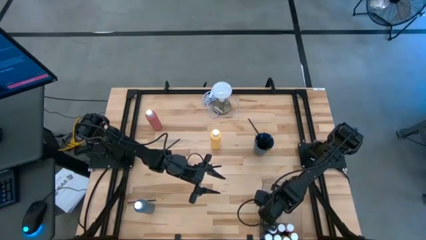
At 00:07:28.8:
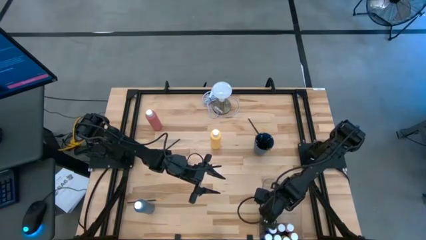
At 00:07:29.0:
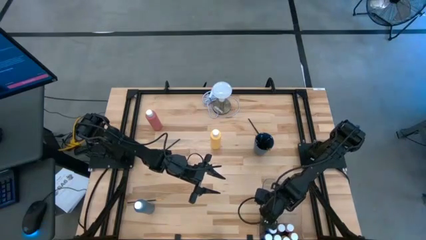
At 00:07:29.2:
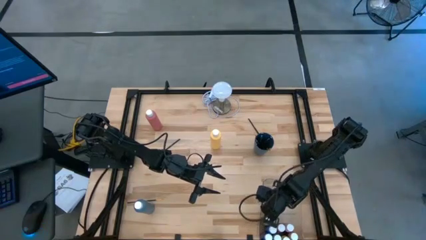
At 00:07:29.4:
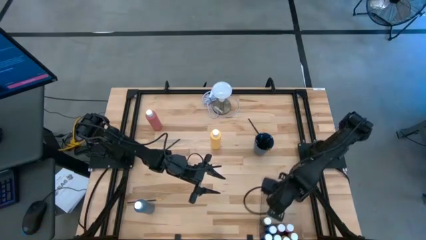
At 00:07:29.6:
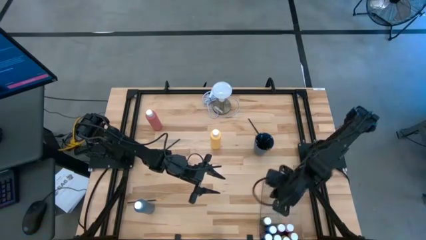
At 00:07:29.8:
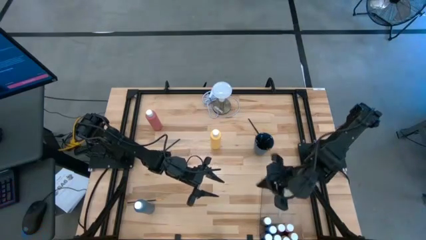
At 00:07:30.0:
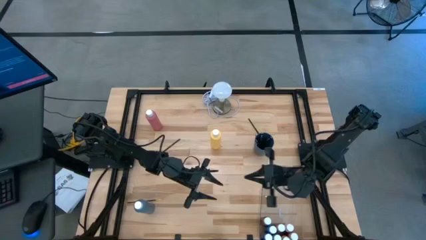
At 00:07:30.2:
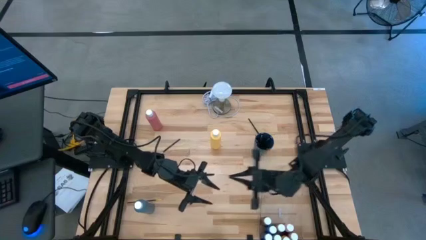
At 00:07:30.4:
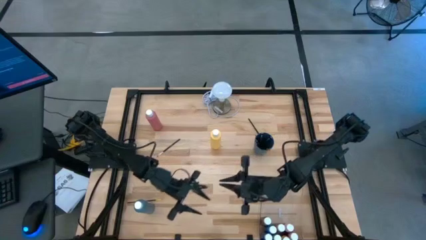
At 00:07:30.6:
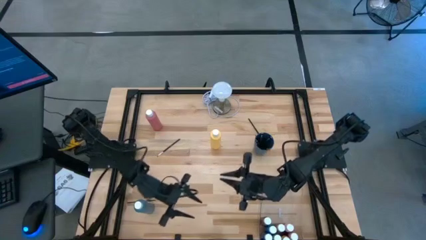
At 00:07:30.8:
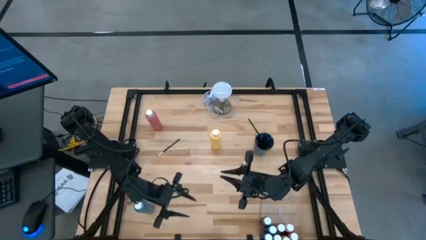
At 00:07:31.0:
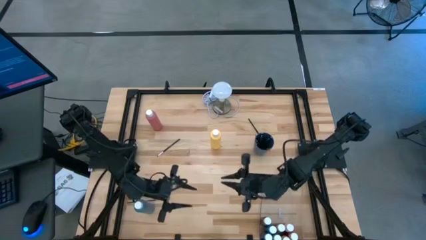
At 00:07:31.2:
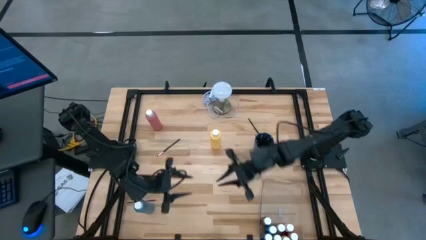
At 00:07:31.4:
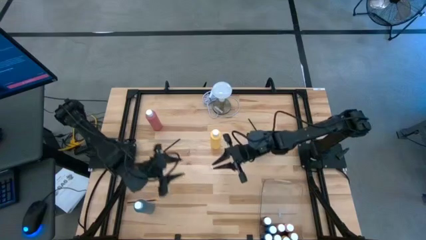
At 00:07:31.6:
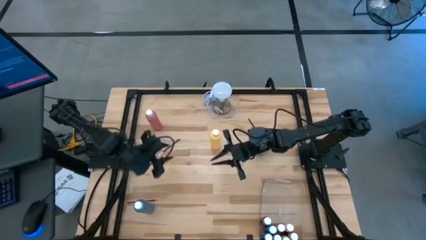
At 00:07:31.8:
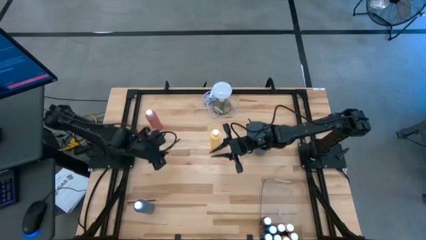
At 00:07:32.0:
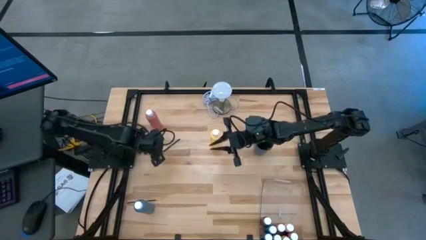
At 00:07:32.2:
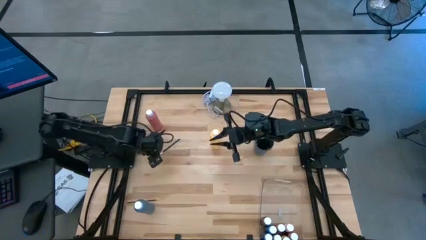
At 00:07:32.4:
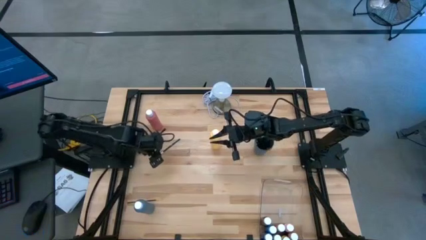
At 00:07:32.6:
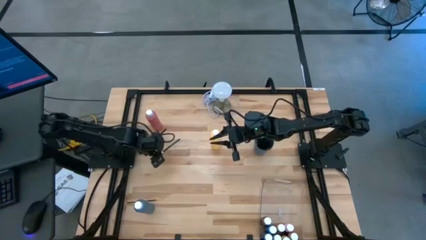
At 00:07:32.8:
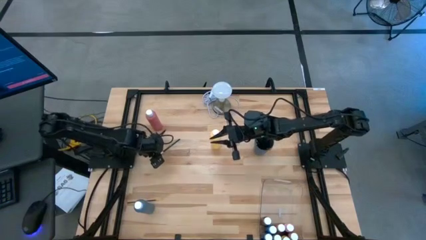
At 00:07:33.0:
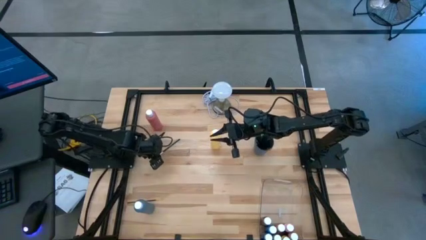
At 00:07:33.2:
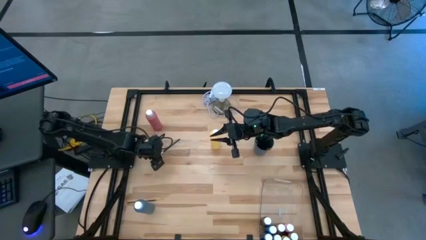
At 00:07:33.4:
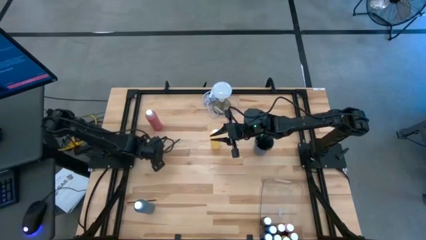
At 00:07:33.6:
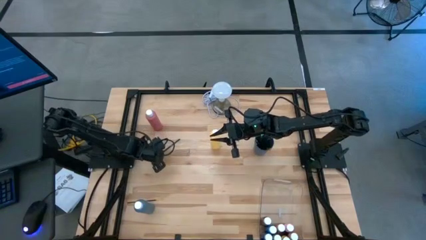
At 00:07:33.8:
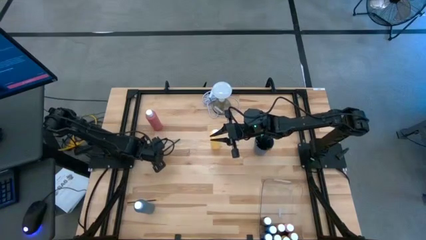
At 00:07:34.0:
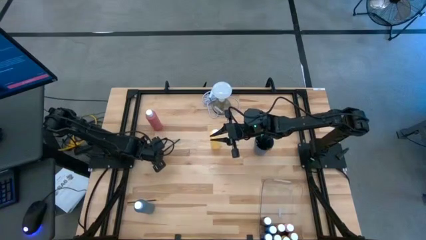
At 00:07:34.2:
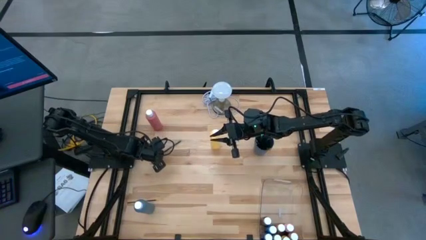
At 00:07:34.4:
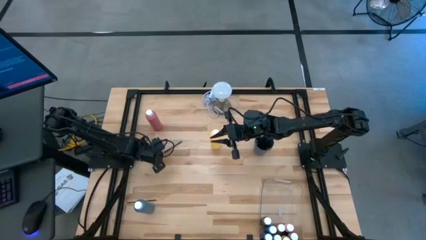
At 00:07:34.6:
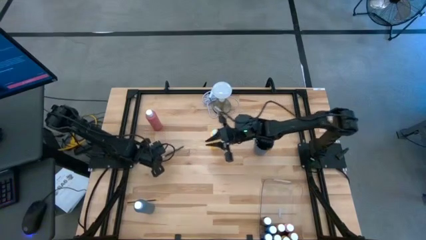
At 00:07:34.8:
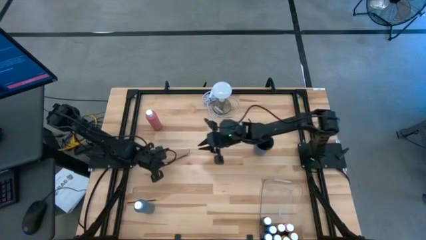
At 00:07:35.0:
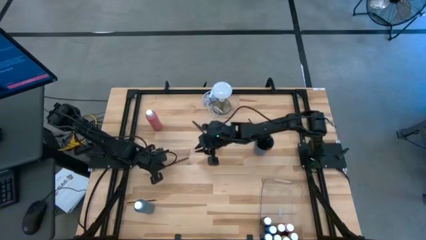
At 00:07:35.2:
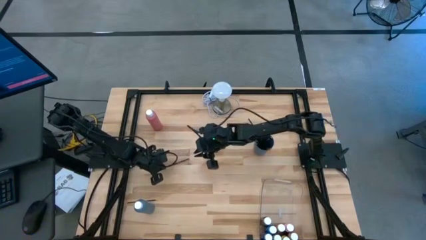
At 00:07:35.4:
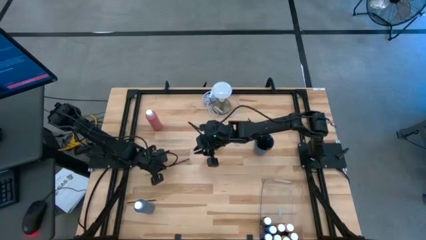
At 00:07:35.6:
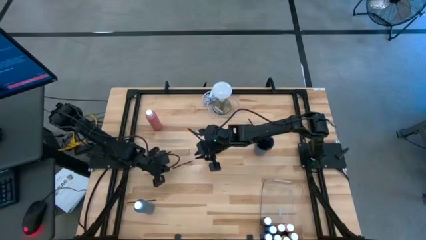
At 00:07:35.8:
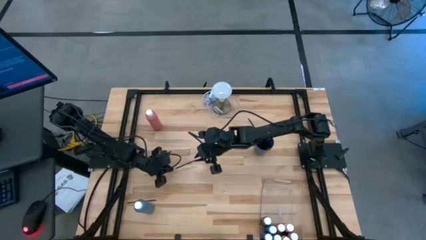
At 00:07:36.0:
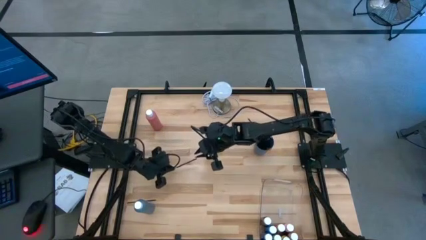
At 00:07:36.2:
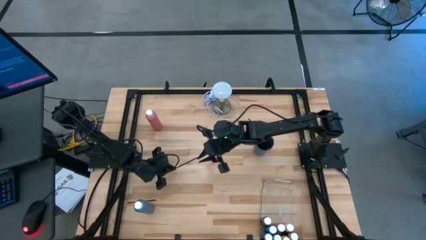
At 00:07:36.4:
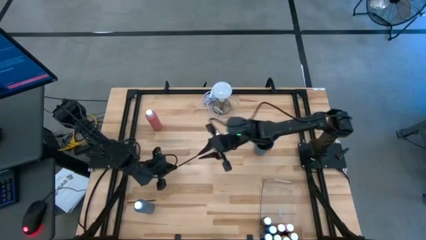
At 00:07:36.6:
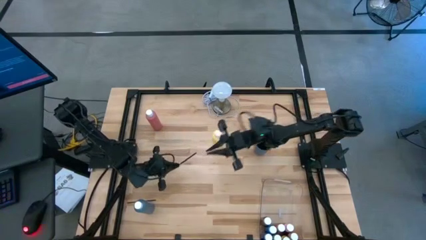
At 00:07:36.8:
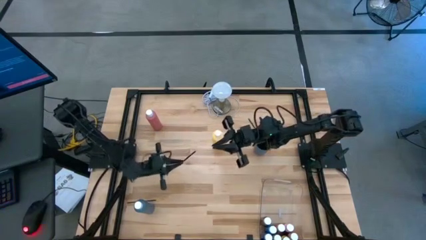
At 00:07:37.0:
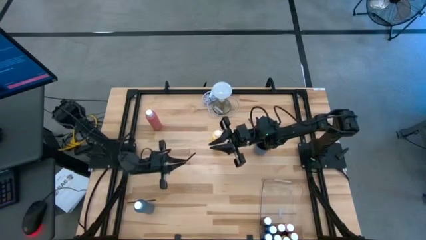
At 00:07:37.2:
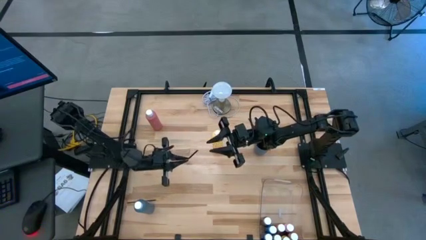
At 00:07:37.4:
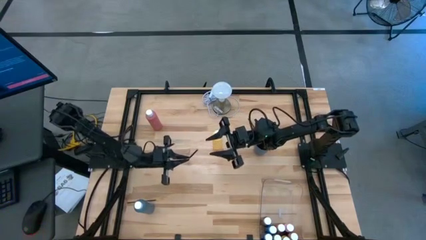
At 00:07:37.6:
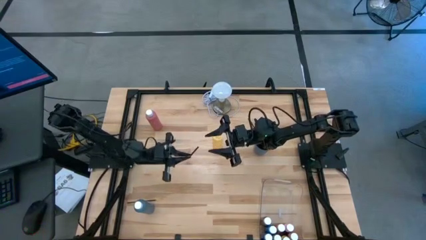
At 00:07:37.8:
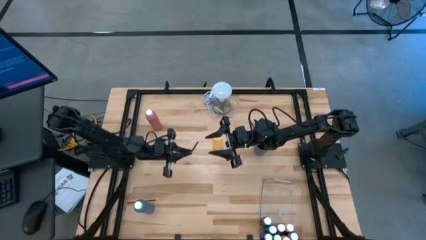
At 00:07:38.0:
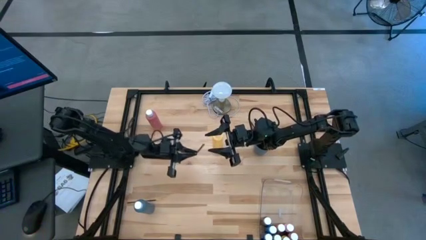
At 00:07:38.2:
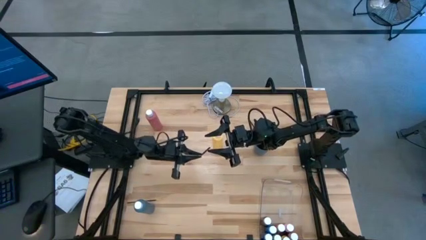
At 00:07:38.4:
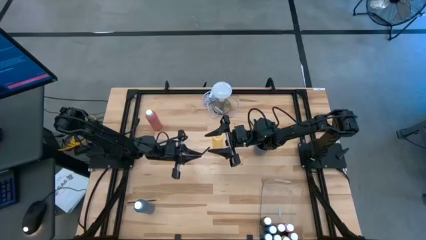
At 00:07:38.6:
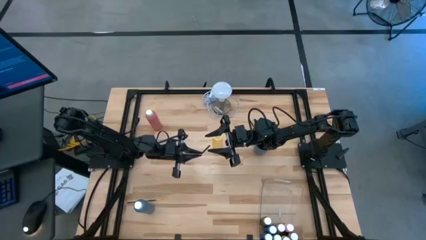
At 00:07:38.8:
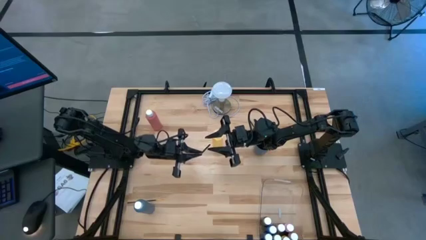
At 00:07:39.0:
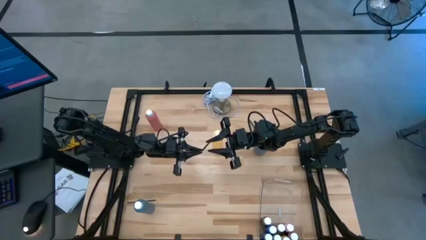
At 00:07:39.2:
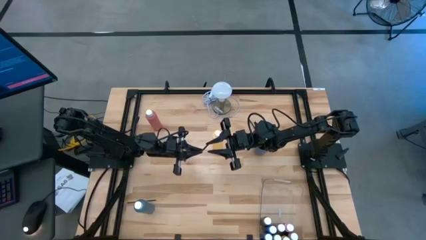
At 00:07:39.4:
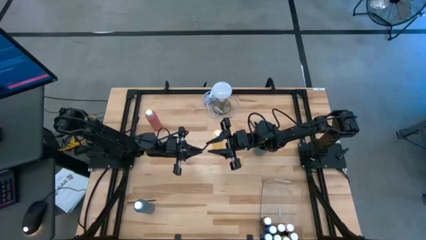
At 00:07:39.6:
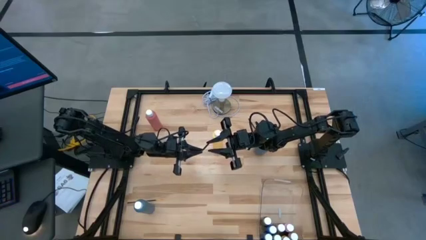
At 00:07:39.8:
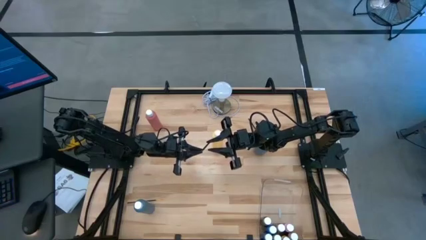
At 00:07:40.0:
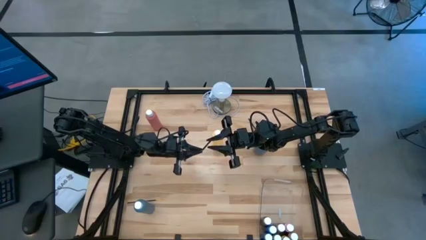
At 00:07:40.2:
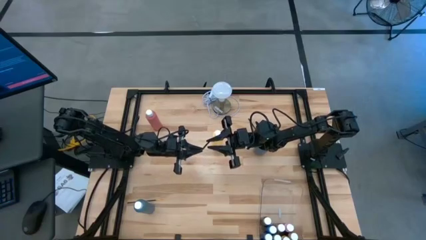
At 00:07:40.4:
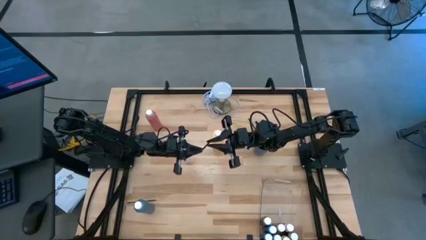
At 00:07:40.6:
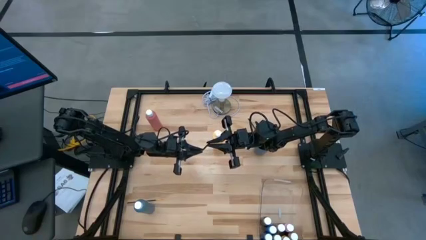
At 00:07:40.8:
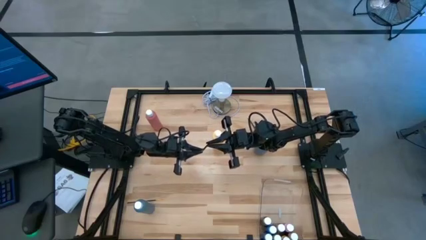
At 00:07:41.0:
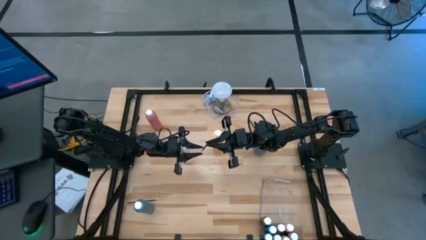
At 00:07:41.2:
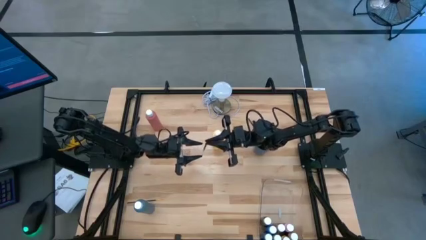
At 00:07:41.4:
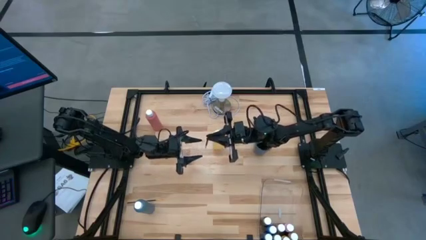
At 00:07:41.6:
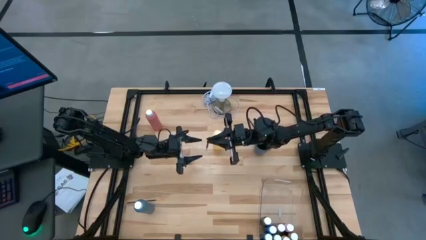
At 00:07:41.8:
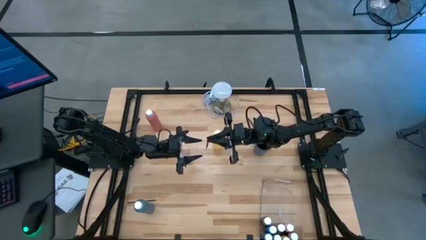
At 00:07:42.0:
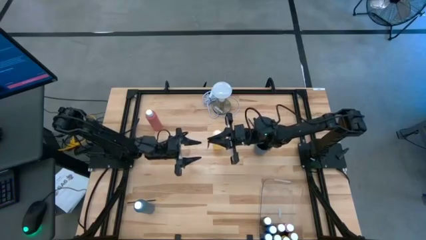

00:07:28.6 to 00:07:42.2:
Task: Pick & Place Paint Supplies
Put the left black silver paintbrush into the blue cup
